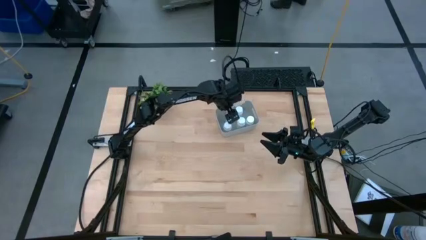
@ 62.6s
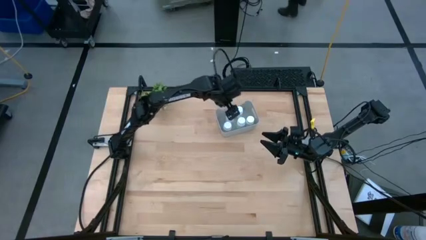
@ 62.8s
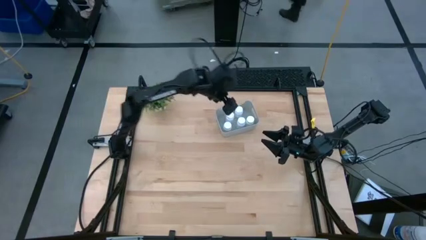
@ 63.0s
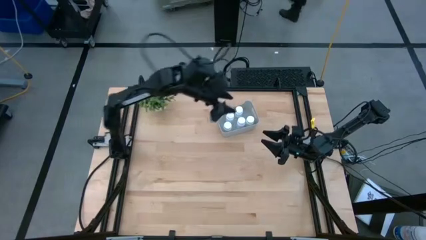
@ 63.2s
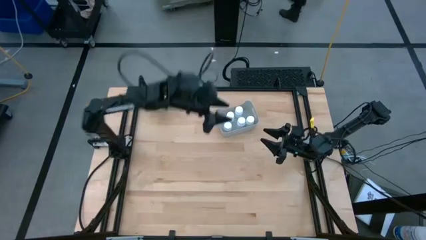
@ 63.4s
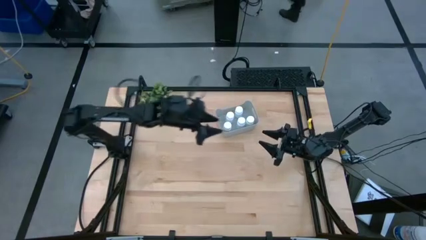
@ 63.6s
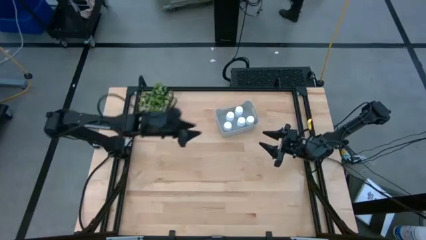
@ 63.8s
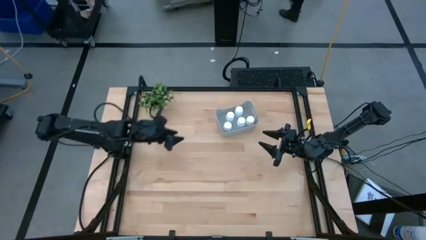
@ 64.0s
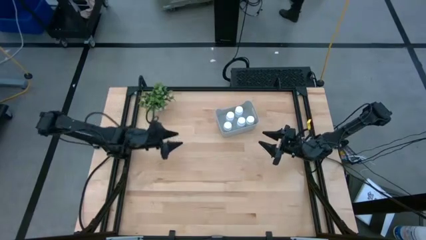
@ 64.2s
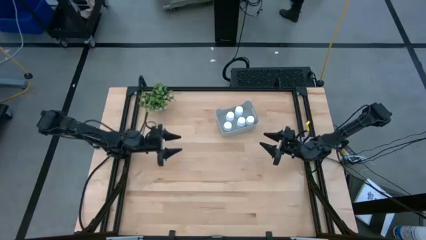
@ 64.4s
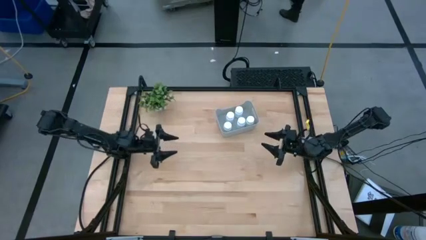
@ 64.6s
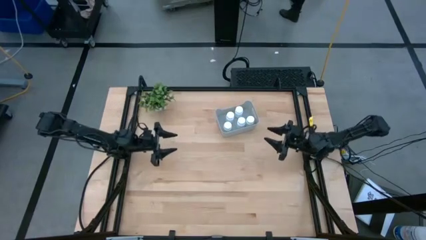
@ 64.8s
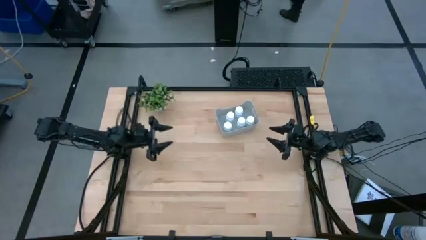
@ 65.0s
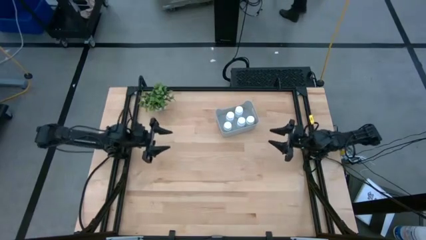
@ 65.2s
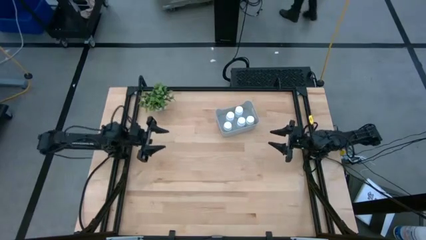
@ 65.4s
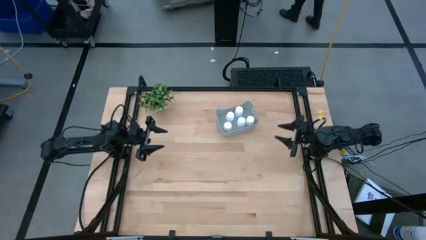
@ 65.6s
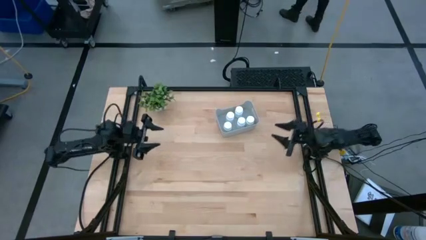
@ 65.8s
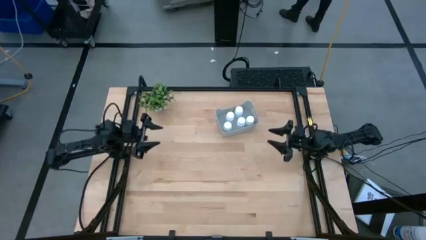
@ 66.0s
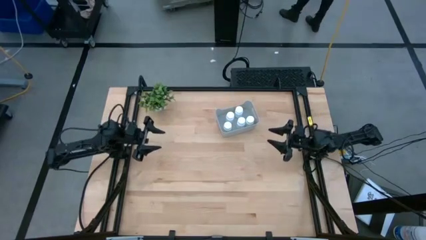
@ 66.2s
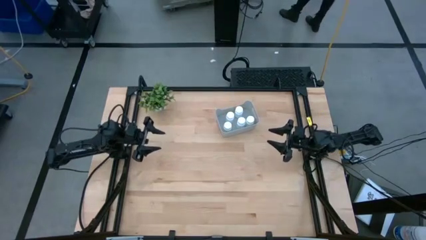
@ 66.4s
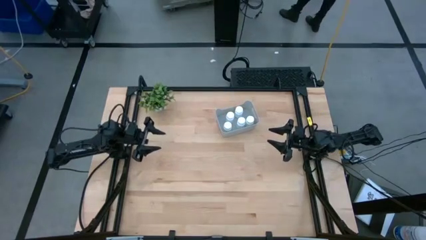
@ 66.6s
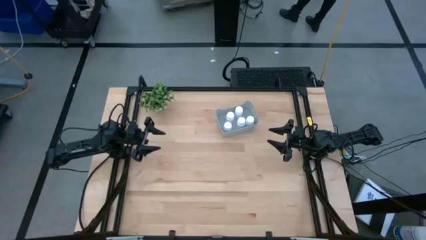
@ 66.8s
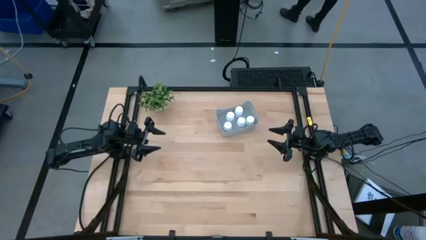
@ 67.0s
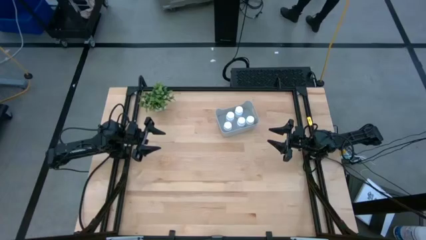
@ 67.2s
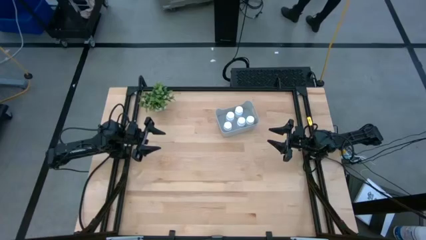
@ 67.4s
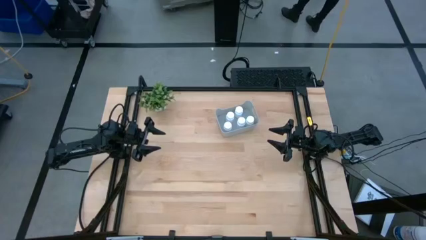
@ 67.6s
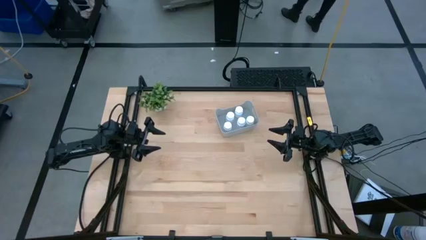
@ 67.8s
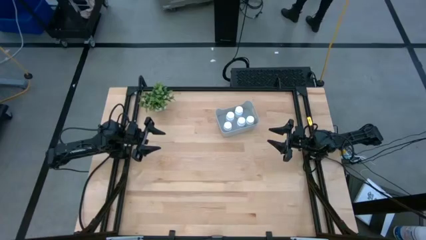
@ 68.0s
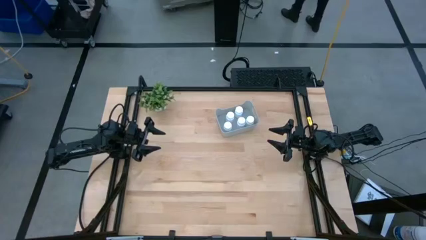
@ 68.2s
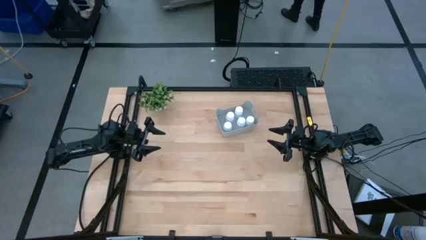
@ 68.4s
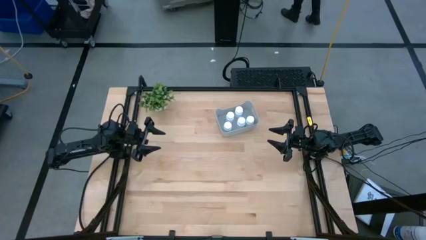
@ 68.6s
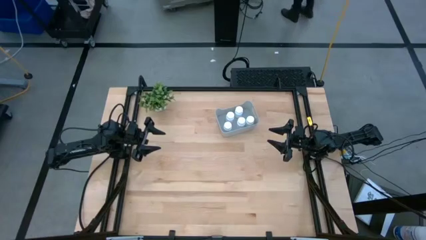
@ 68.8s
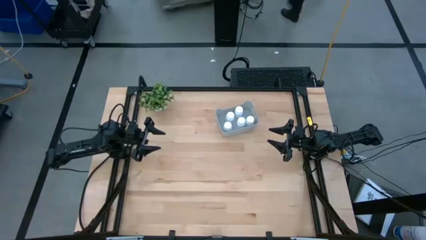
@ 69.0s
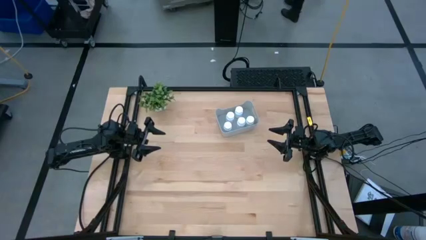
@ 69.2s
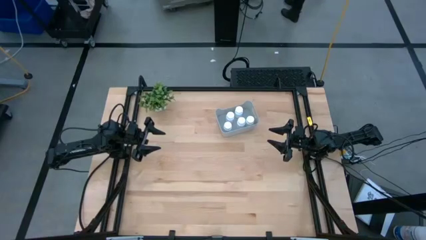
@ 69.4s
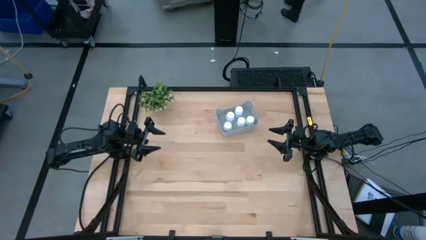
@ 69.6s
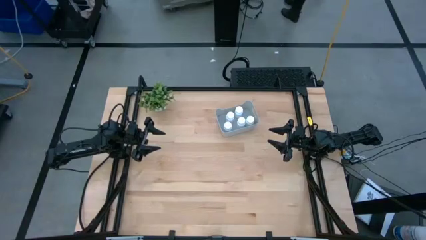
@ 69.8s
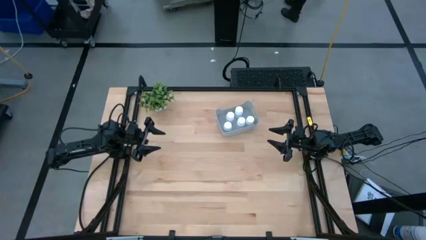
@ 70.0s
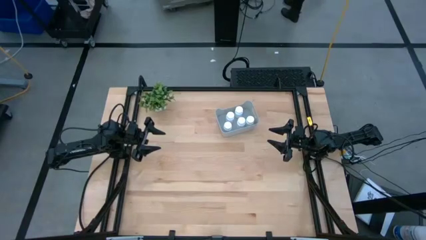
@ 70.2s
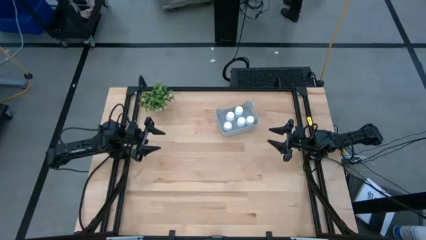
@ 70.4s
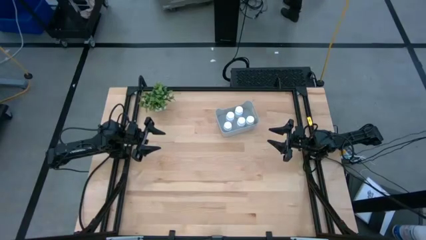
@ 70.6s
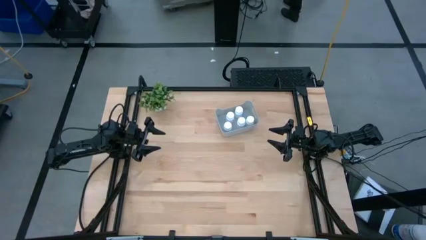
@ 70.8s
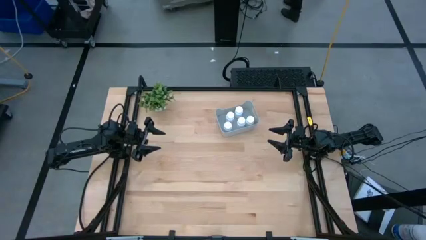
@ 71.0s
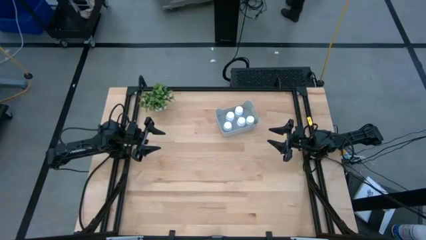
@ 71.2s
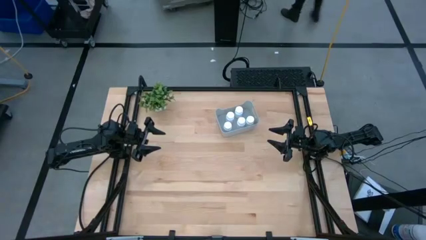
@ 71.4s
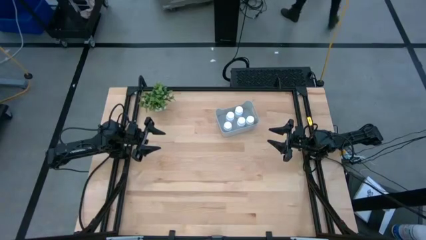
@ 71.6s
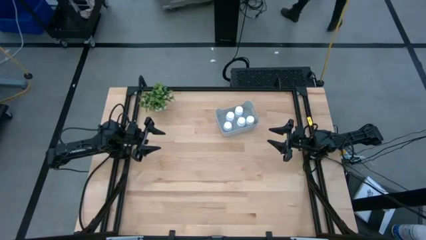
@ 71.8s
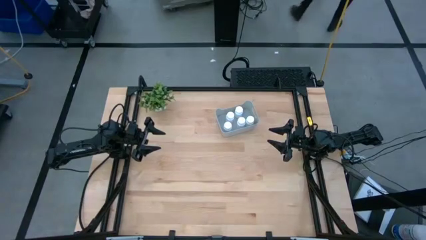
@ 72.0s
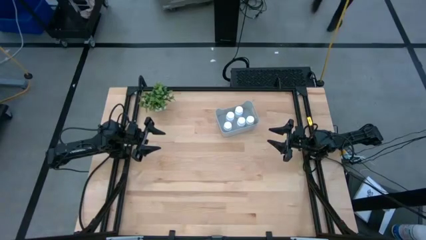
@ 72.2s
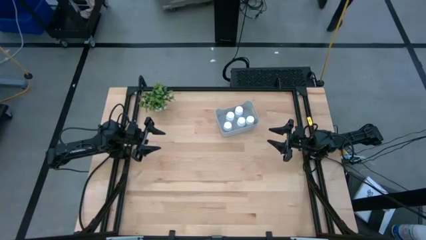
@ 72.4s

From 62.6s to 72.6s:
Task: Pick and place pill bottles into a basket
Return to Home Position
